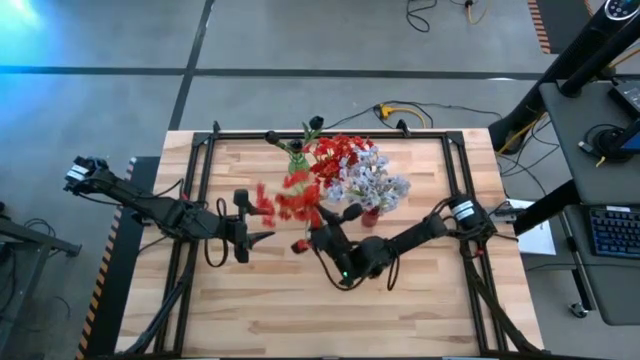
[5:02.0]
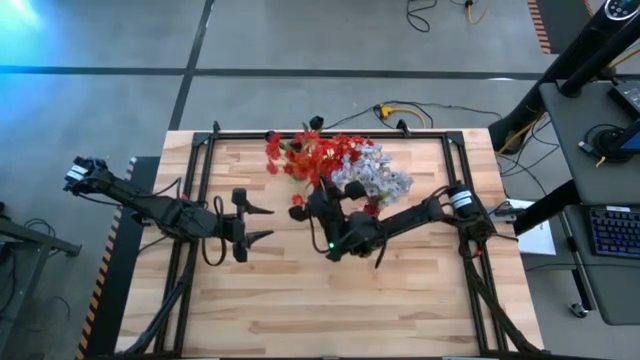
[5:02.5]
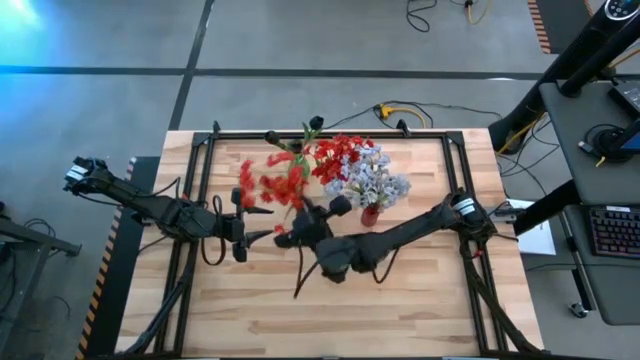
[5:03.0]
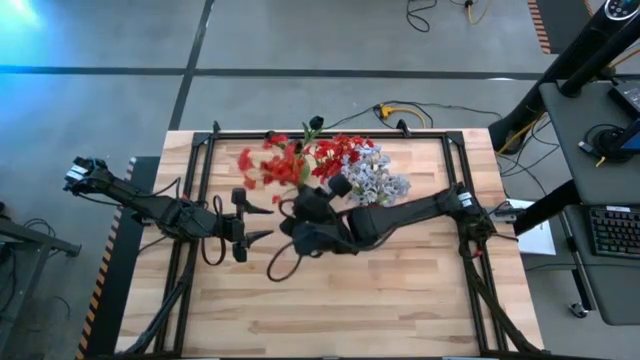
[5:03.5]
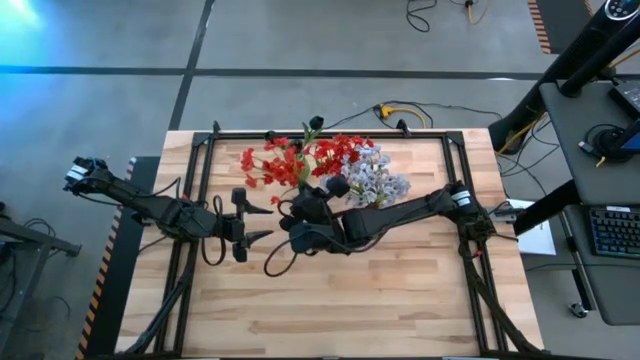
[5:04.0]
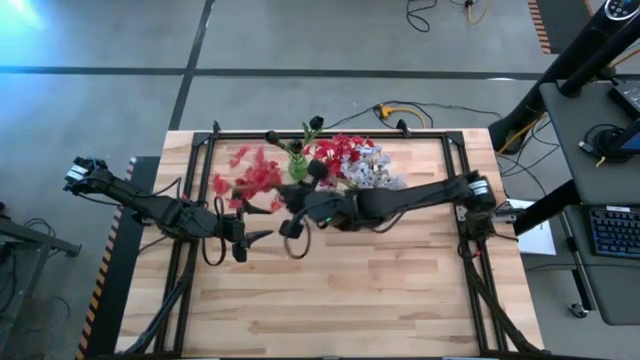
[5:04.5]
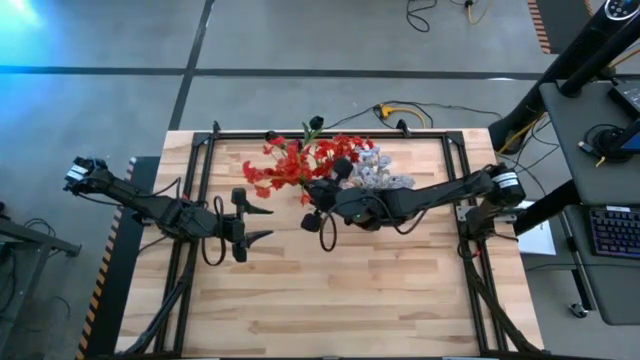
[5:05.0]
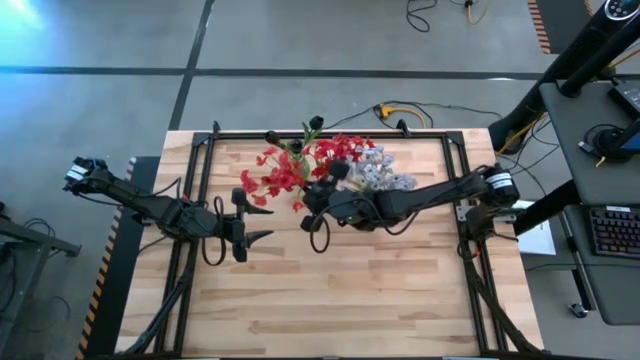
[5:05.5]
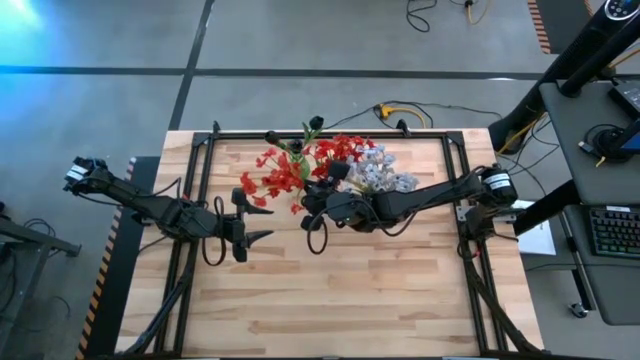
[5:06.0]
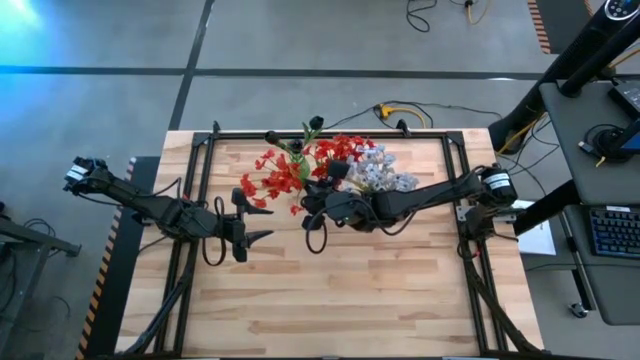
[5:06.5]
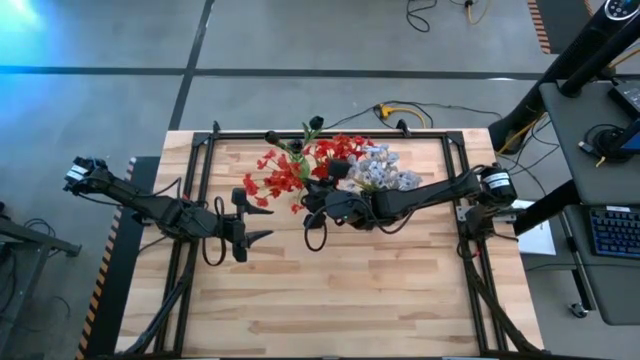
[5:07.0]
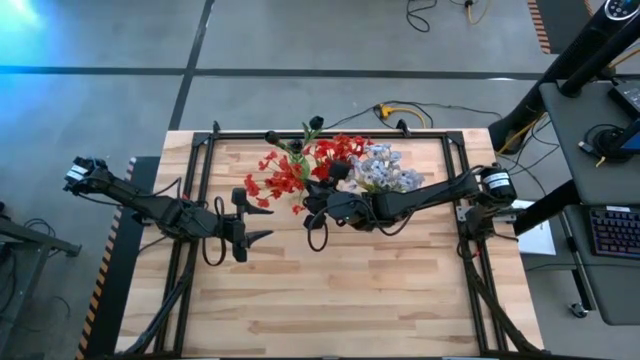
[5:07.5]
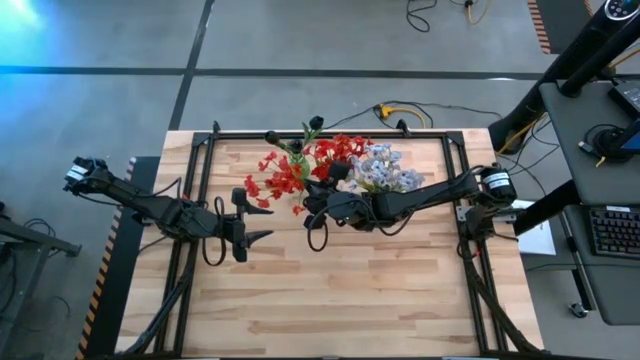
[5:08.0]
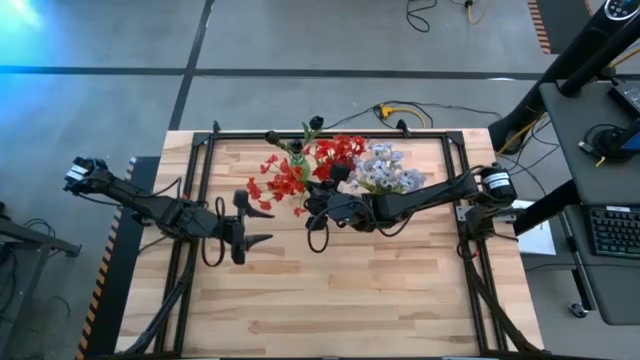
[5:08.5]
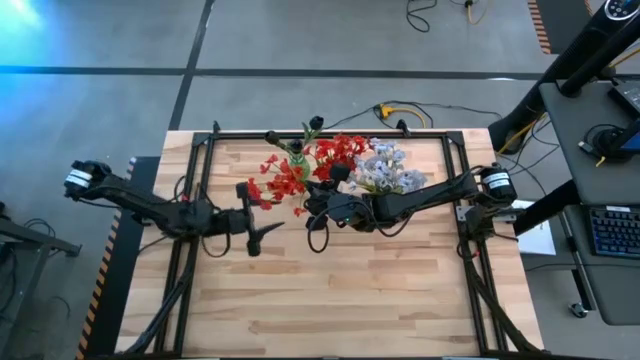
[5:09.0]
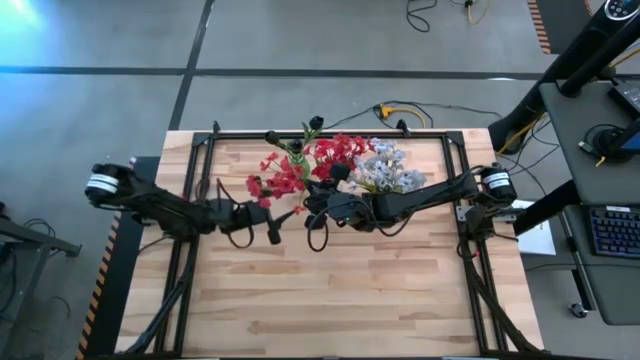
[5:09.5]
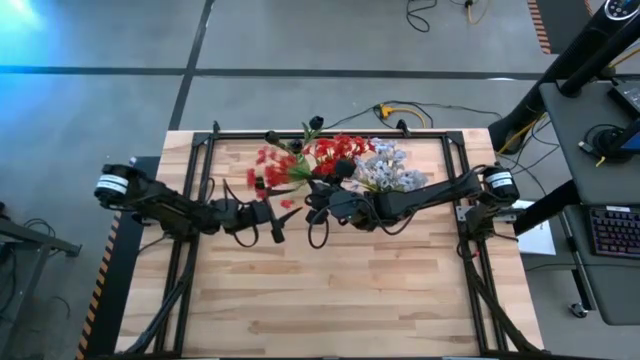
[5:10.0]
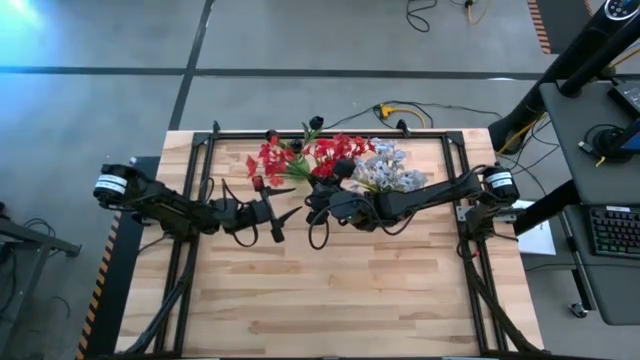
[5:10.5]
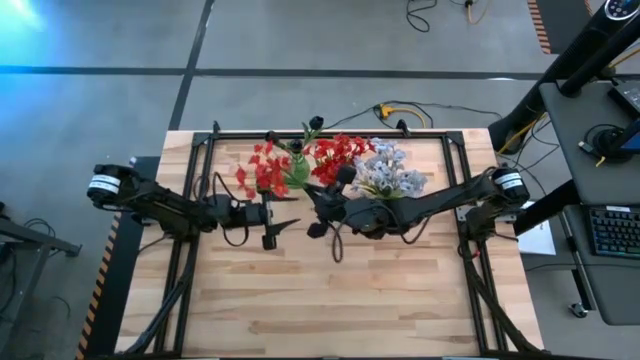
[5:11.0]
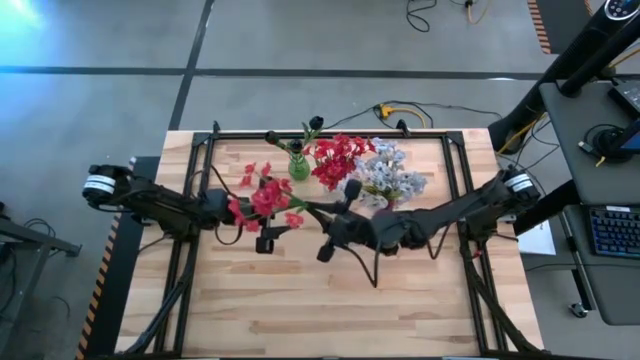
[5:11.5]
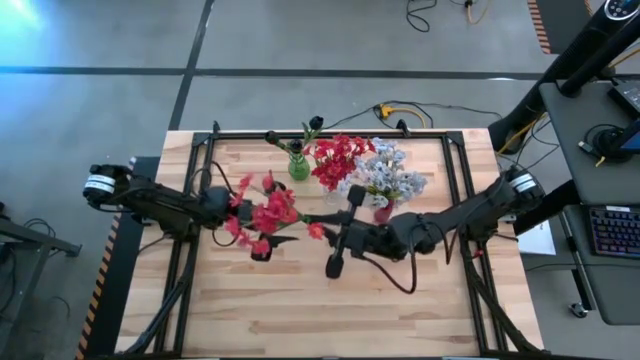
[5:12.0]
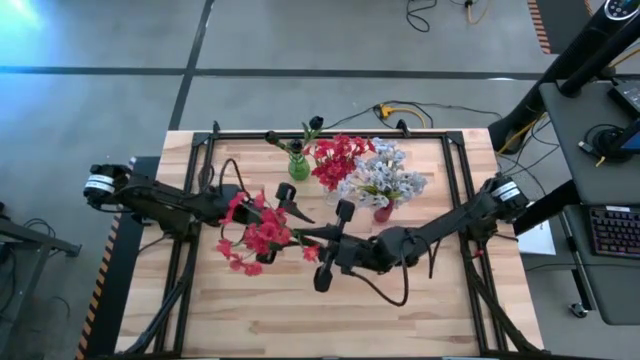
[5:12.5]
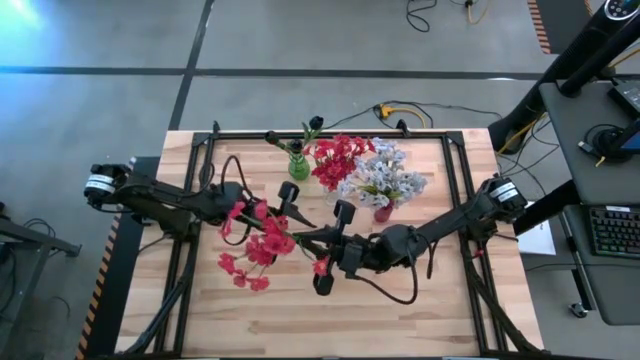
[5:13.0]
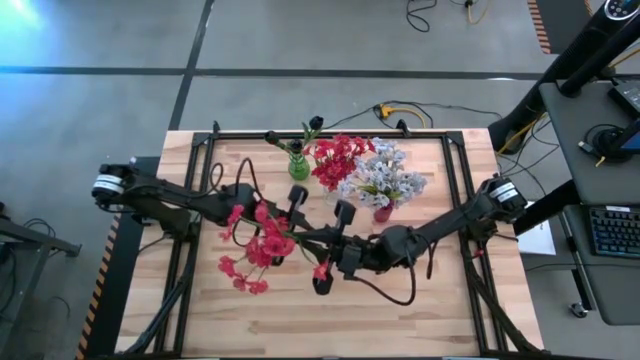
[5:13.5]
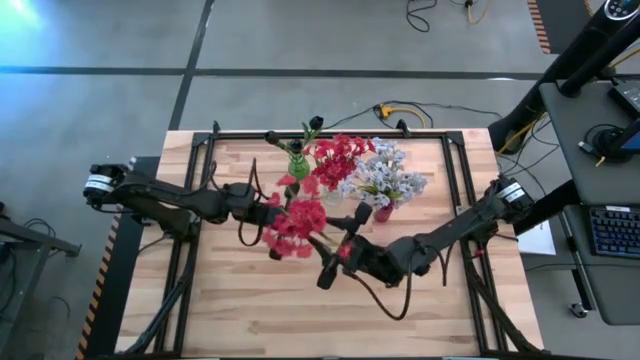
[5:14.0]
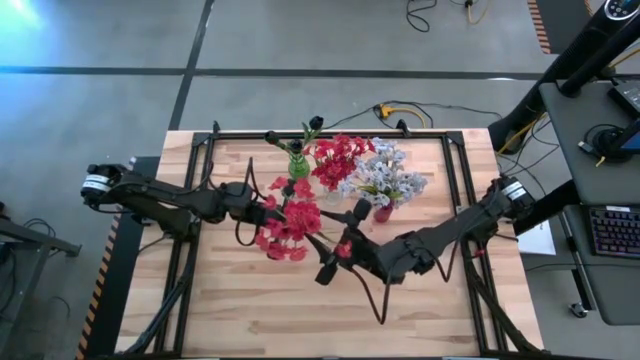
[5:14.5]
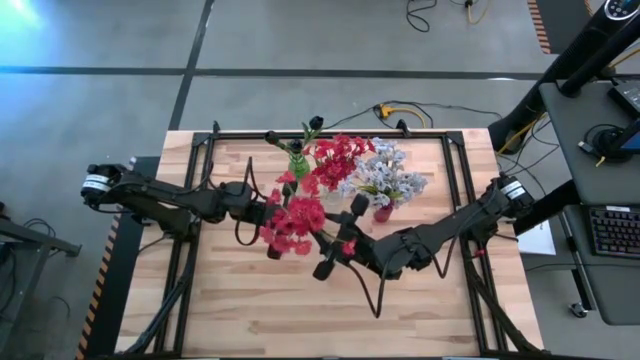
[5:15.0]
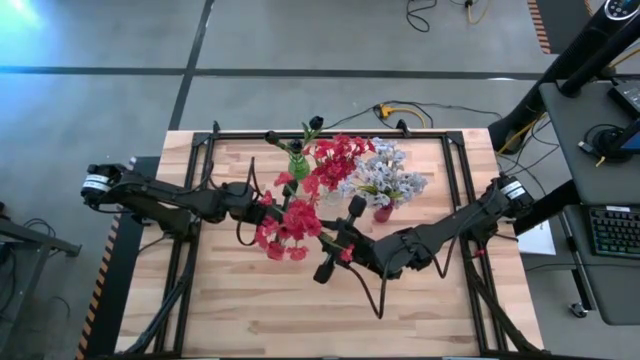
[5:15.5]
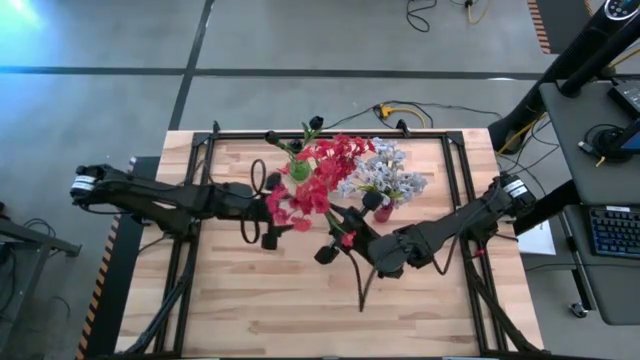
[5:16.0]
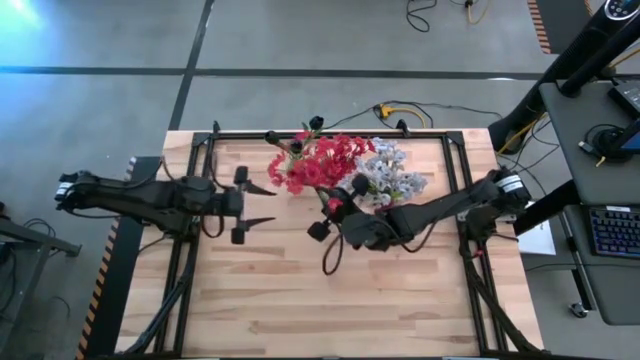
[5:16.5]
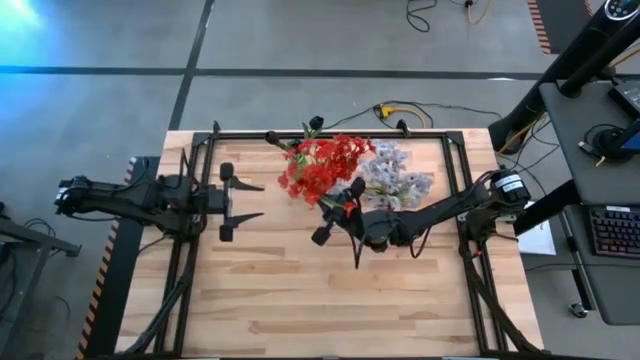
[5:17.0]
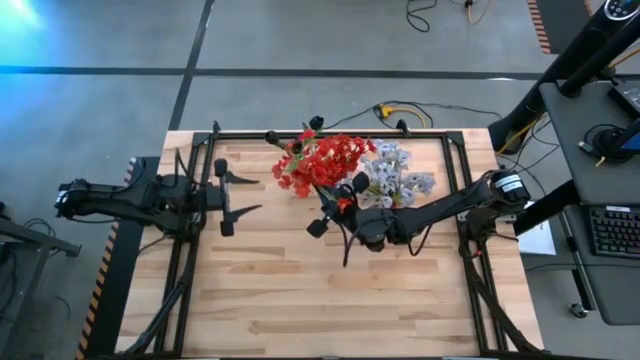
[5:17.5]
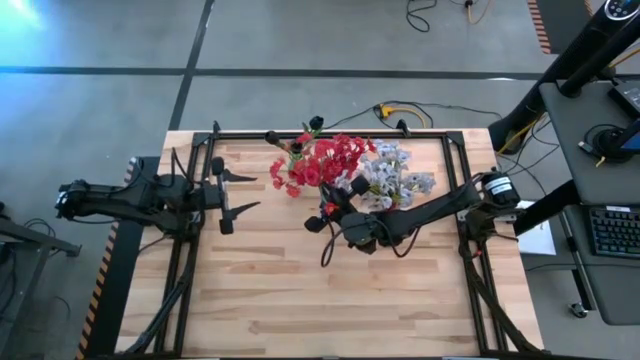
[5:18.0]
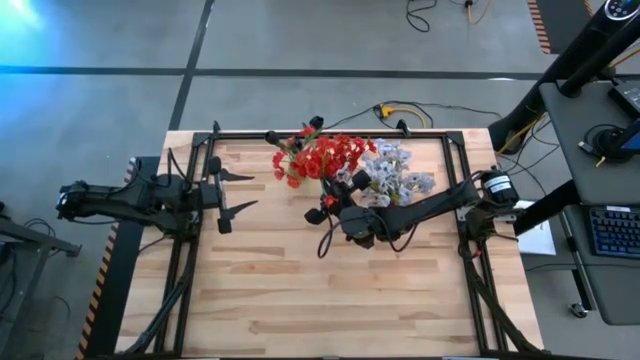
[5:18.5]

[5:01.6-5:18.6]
Task: Sort flowers into vase by color
Put the orange flowers into the transparent vase

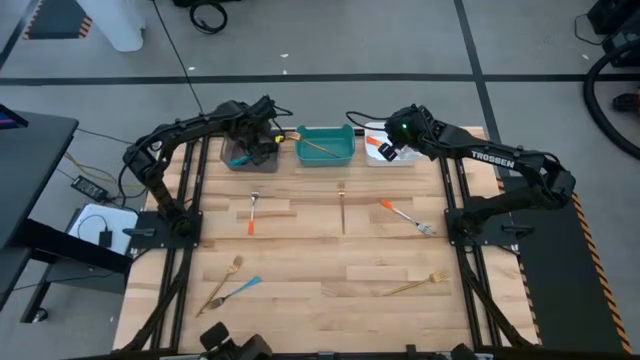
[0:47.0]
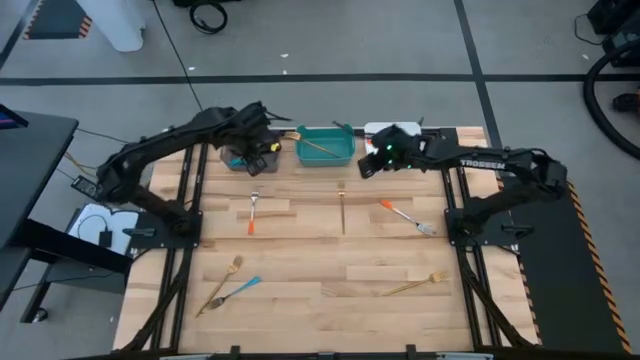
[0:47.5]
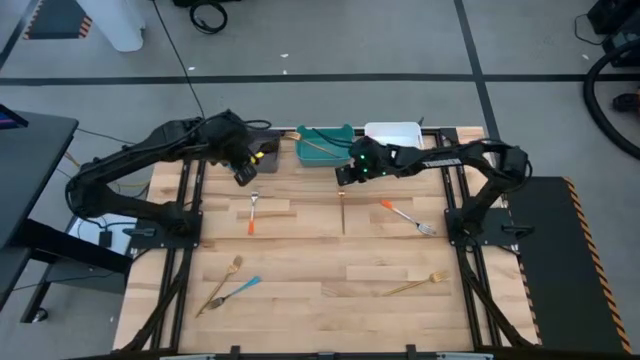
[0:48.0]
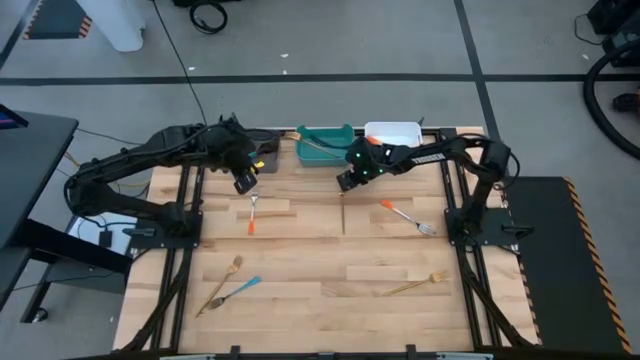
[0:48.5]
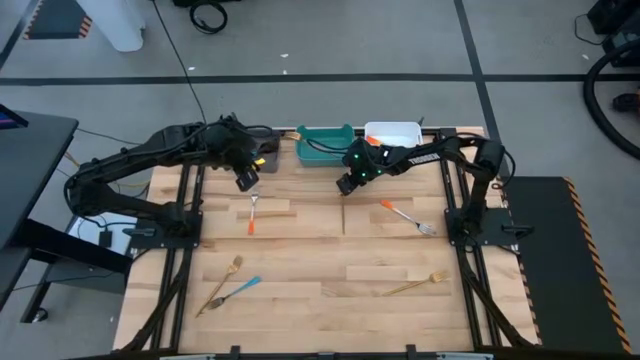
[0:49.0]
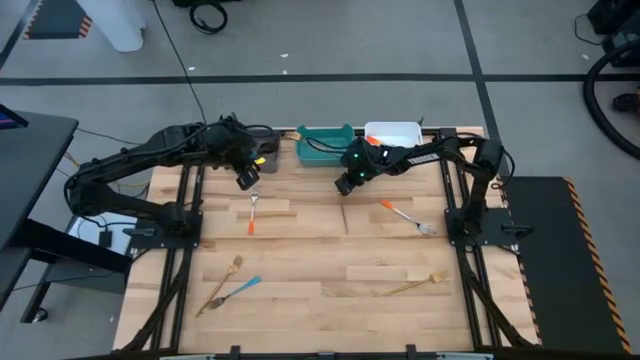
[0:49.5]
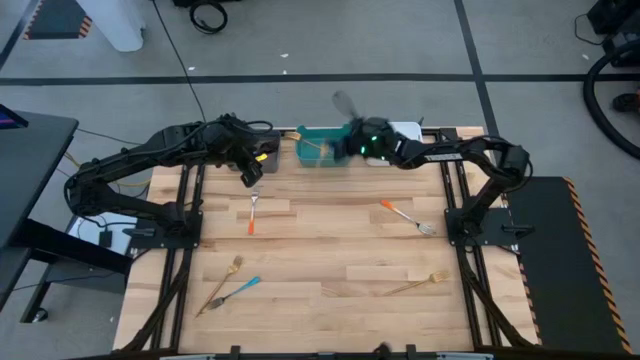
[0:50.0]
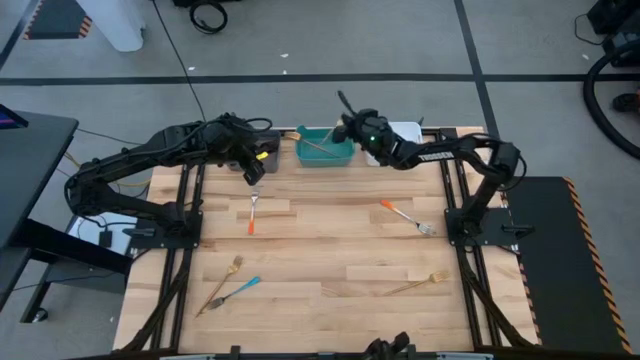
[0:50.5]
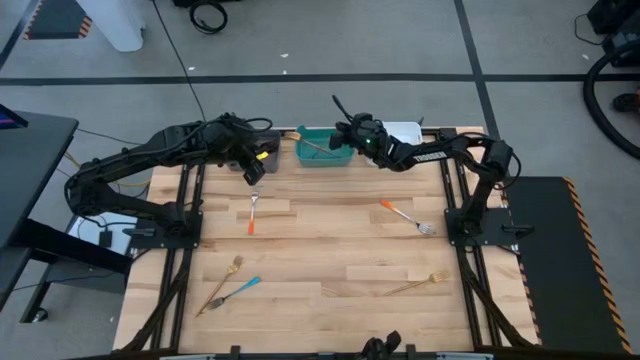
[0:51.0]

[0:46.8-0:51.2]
Task: Sort silverware by color (type)
Put the gold fork into the green bin
